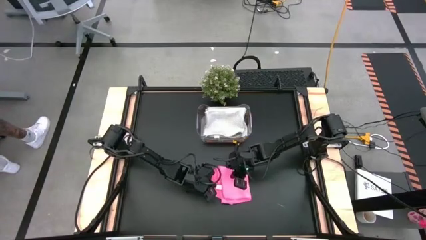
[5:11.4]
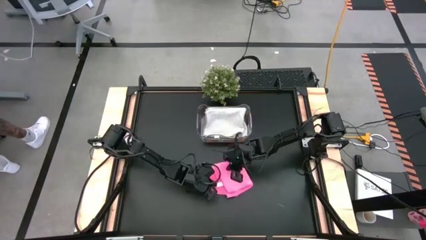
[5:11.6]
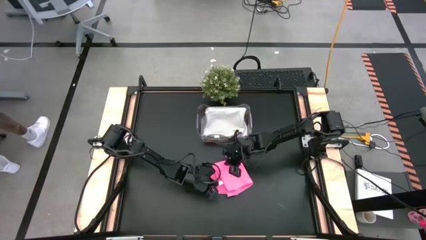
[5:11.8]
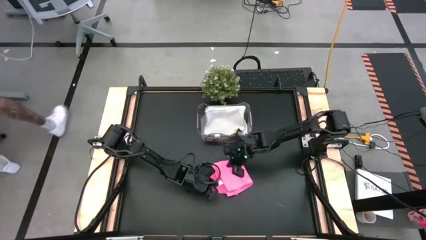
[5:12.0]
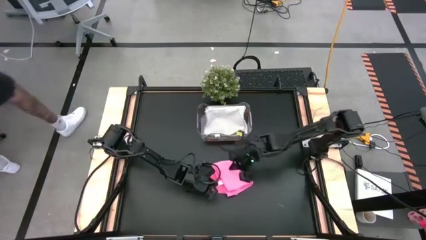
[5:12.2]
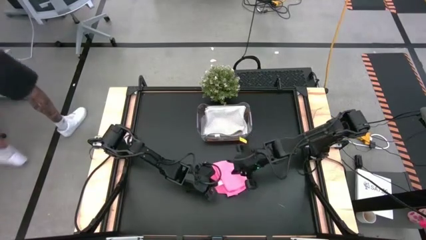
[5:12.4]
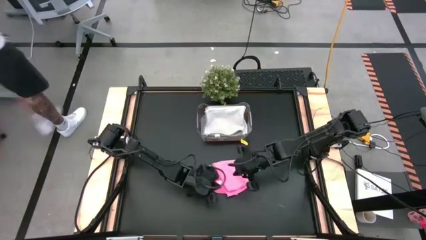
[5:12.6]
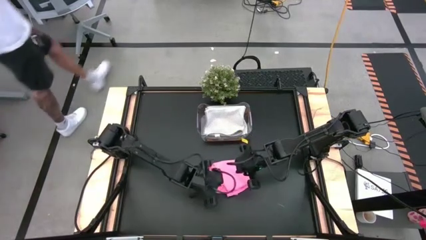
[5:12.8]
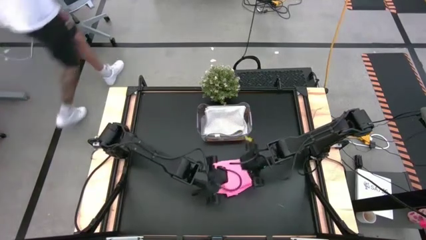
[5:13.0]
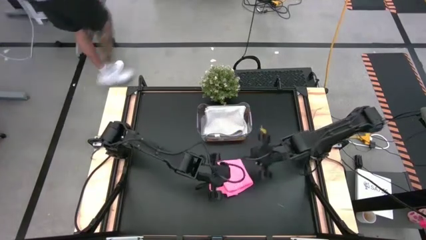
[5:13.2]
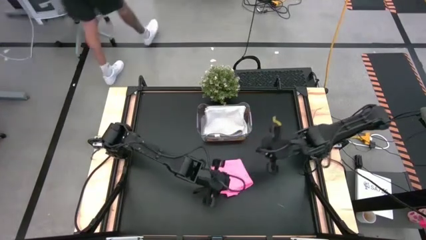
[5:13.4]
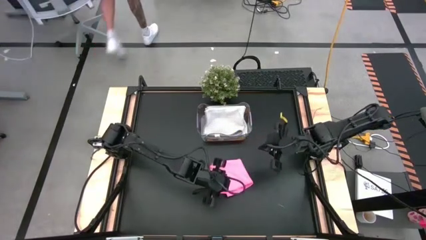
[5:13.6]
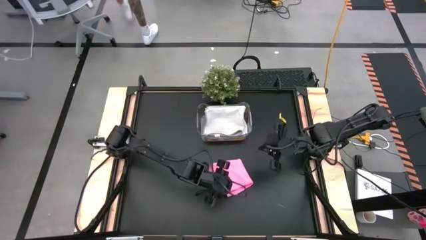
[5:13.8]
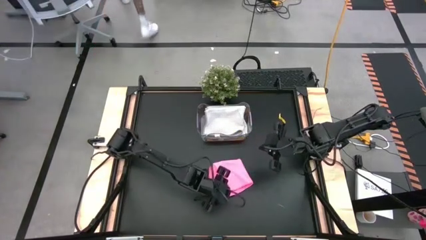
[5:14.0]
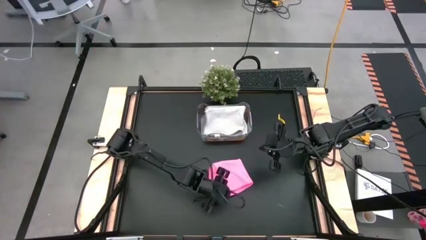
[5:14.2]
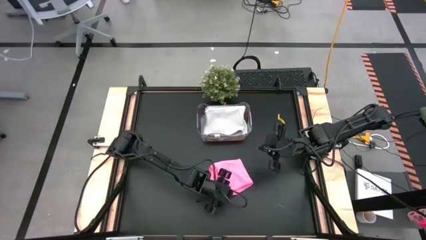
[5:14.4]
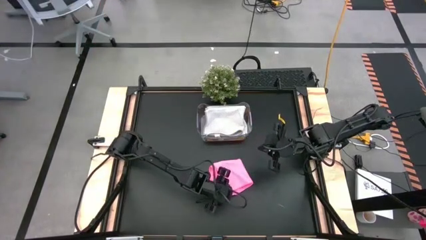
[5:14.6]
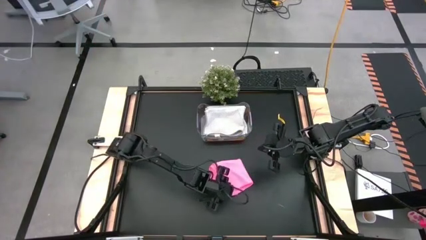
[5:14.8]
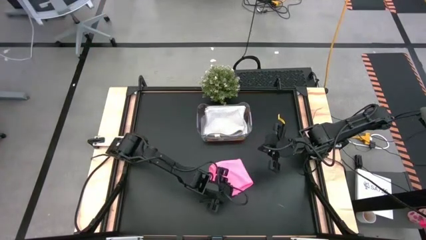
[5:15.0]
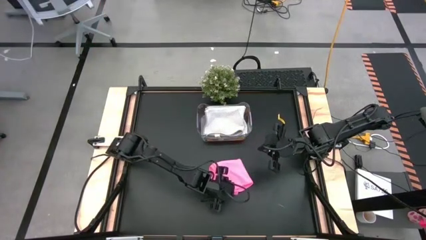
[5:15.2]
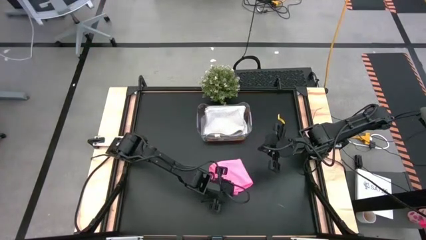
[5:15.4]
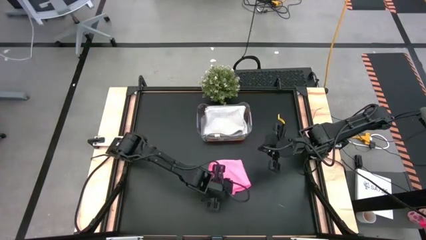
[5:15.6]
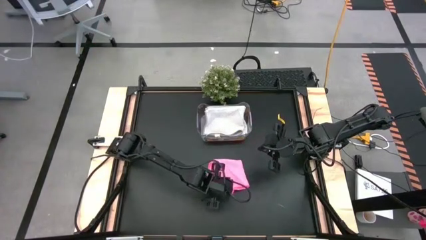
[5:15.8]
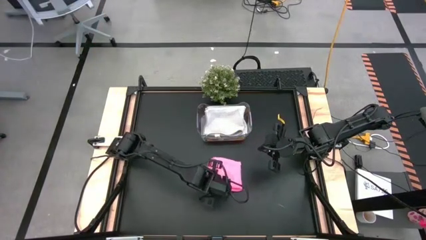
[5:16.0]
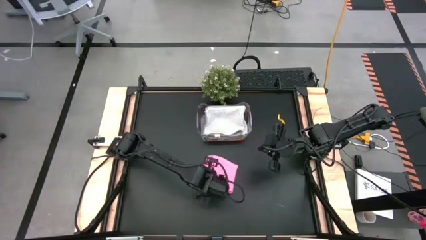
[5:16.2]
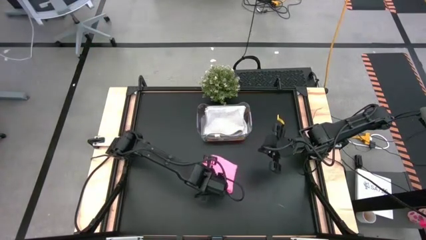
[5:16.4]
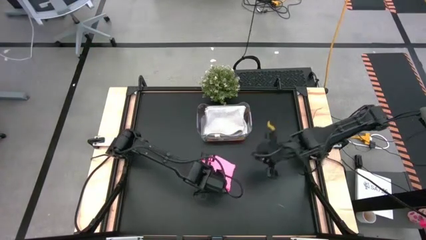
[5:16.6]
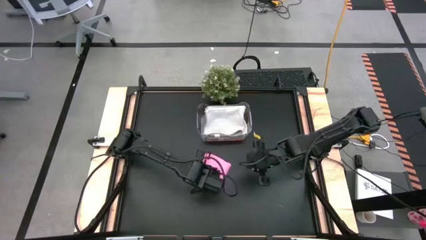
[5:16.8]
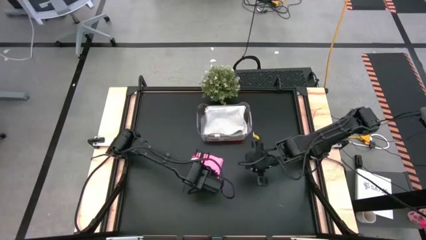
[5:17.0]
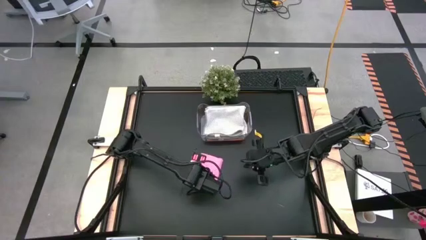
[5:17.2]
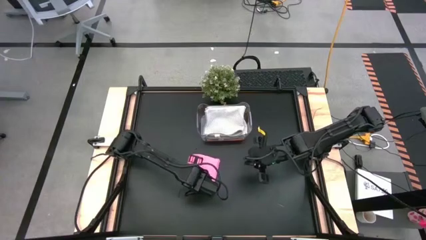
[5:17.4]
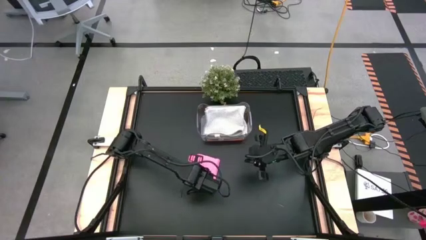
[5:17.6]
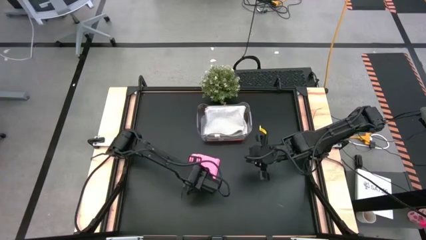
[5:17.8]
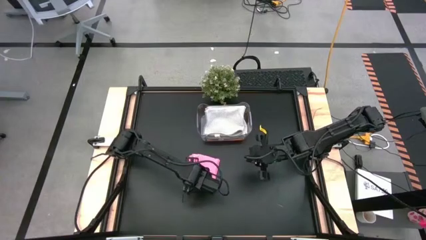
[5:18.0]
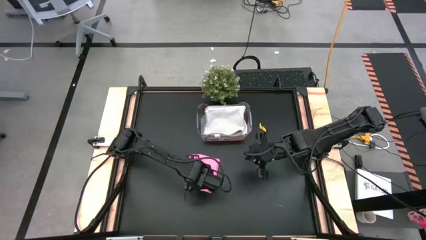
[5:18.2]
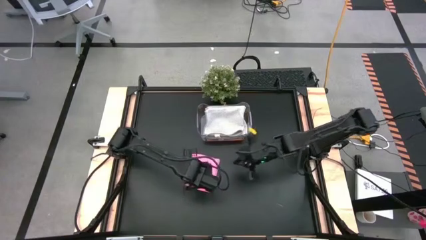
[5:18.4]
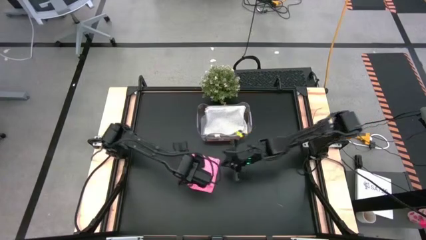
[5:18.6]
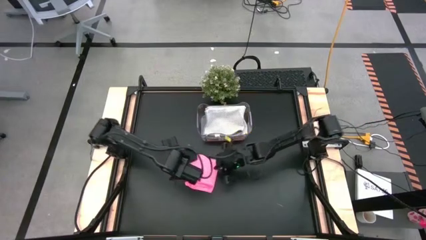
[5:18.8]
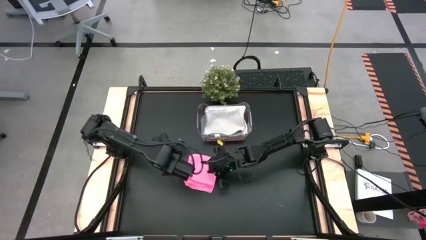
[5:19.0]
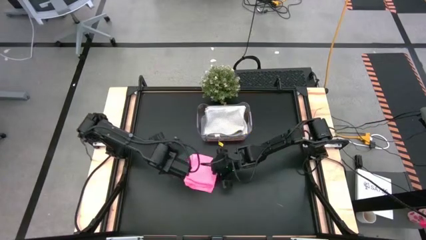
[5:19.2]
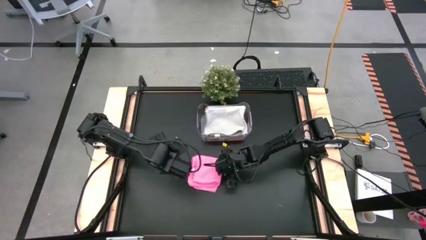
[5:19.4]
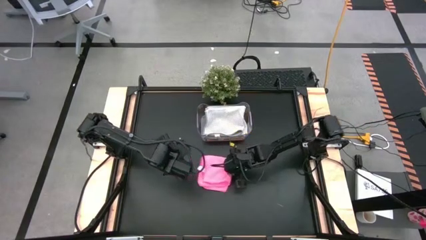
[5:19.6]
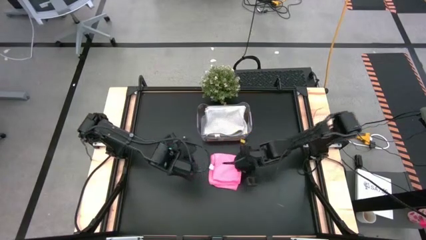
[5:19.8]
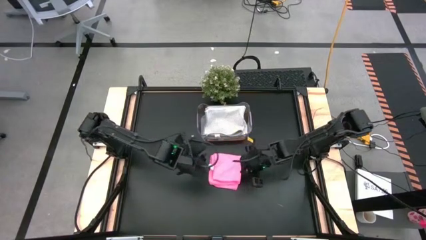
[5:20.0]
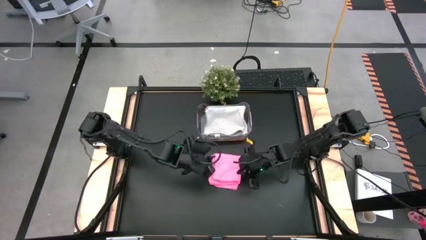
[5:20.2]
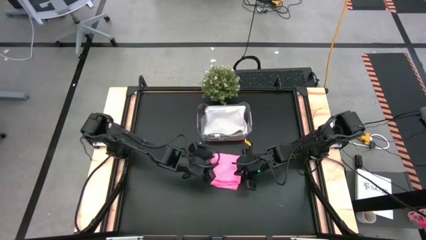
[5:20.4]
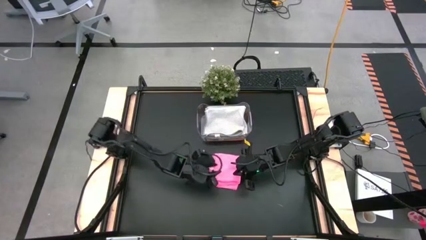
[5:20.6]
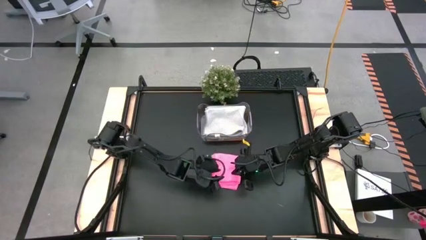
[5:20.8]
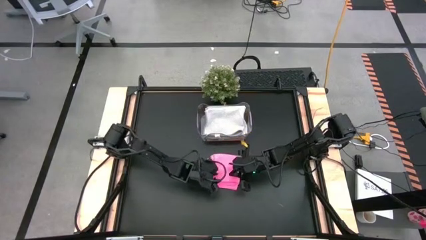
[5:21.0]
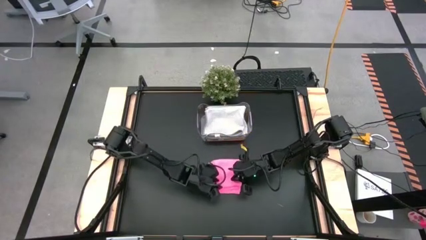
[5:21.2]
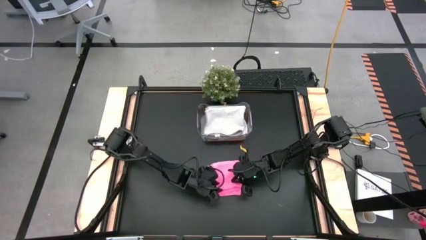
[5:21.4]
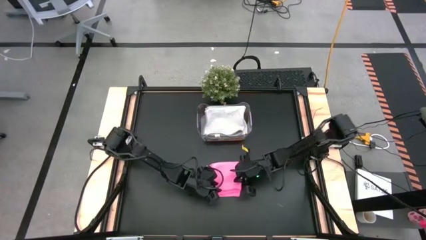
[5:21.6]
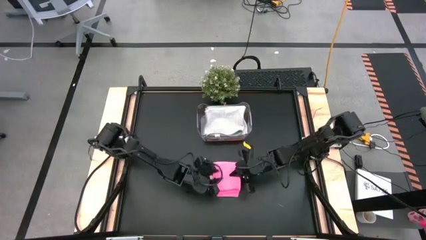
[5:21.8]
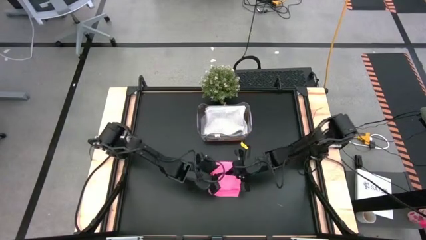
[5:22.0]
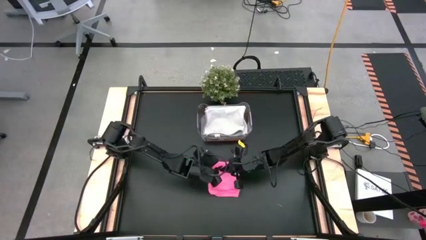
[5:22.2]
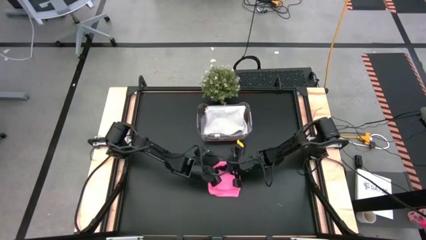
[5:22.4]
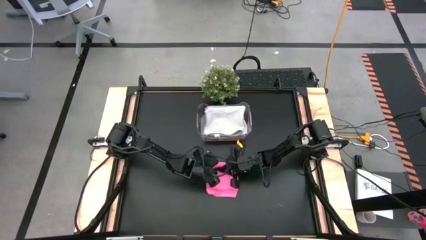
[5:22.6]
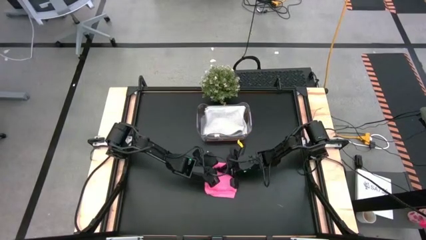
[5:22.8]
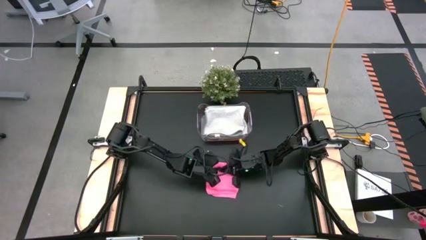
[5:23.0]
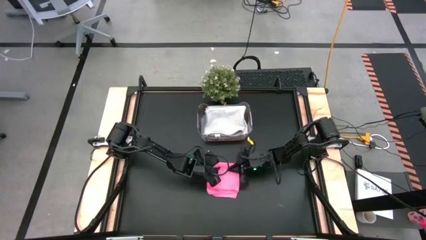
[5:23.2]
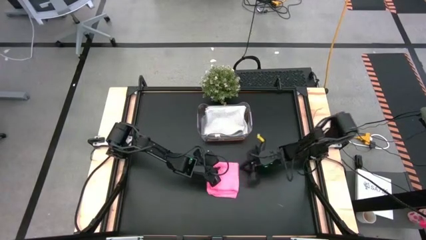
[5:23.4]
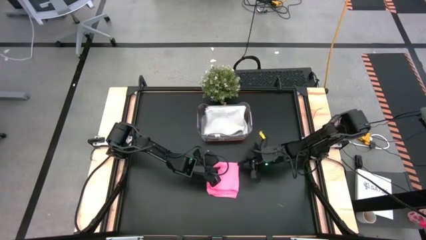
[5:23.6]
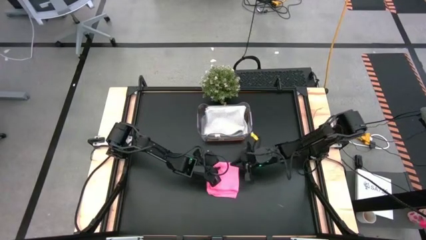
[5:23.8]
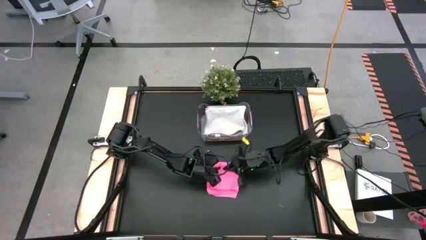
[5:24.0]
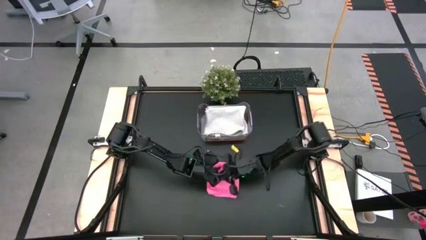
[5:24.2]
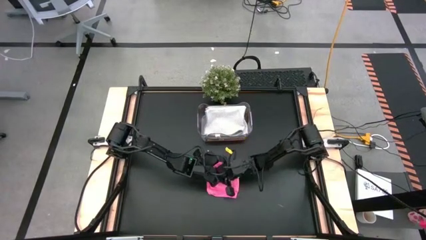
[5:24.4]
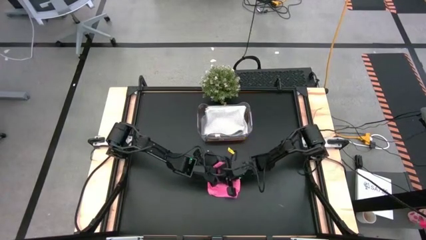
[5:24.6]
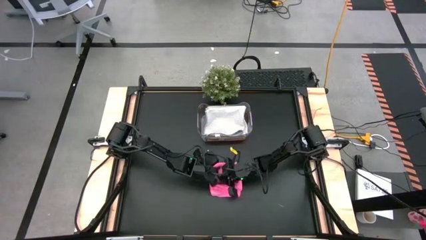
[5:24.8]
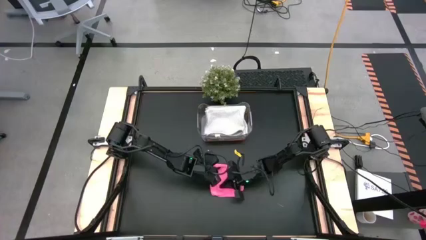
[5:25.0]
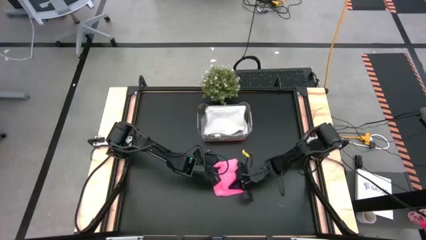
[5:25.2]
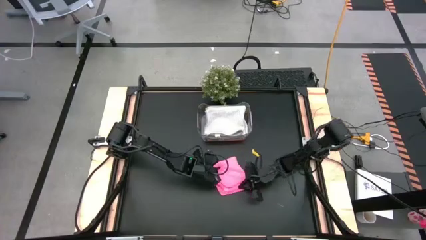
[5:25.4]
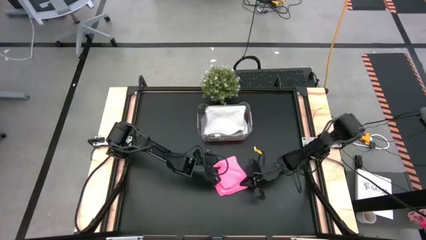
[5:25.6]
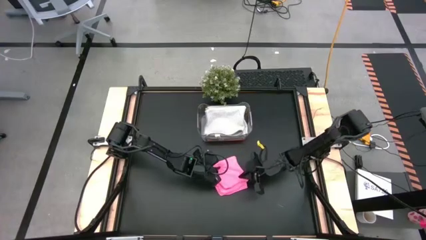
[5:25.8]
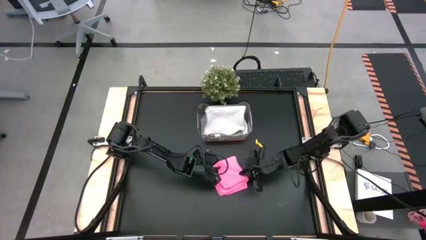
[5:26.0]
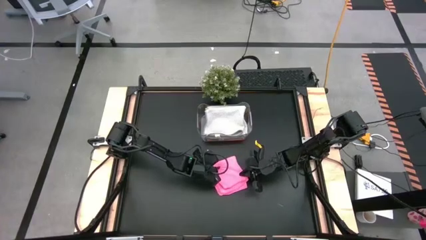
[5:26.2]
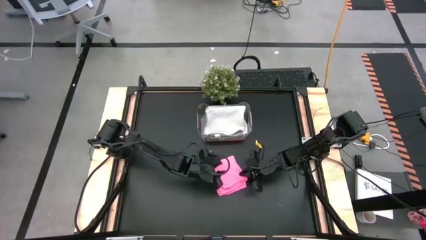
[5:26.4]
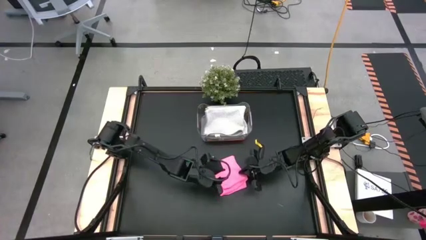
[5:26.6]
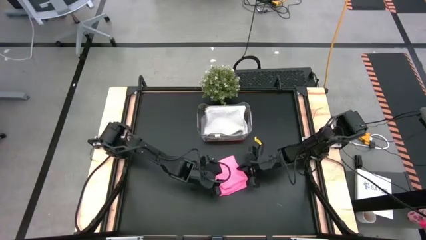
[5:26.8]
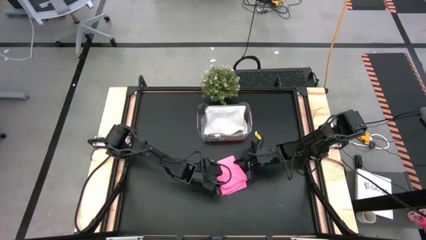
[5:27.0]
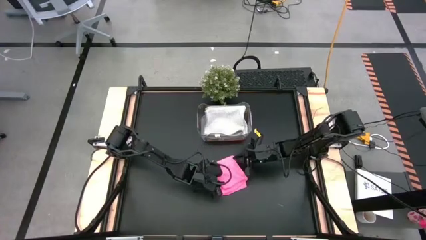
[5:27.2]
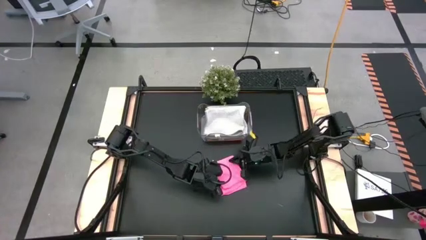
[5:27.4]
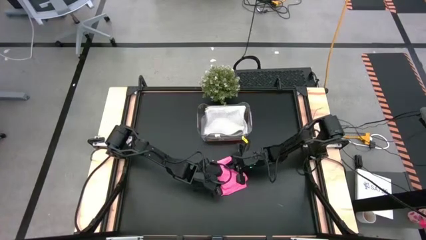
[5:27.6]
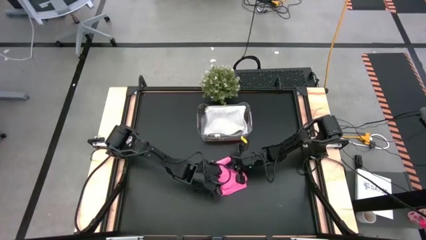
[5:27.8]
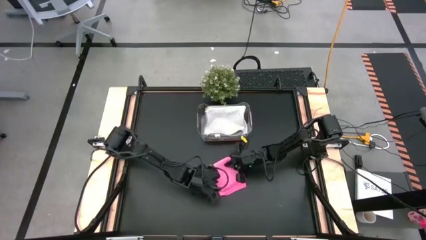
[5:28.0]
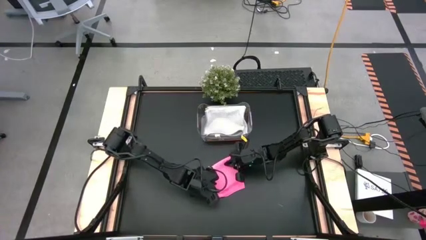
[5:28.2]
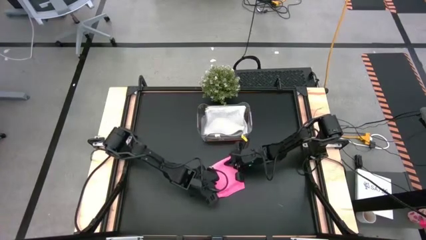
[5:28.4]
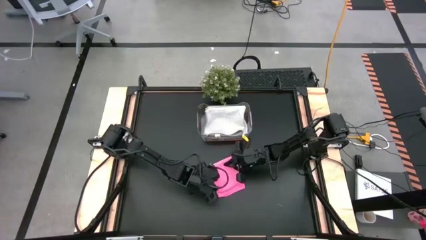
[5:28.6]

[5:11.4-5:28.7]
Task: Fold microfiber towels
Fold the pink microfiber towel
